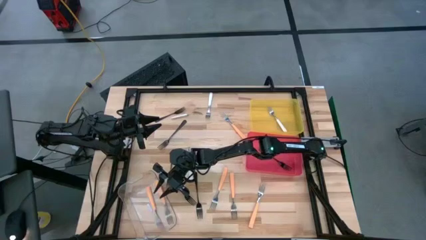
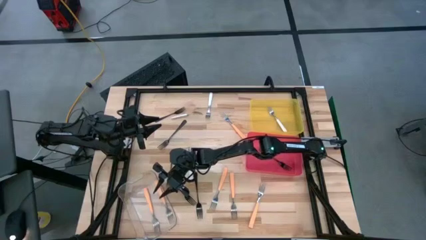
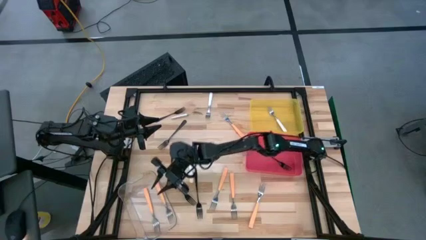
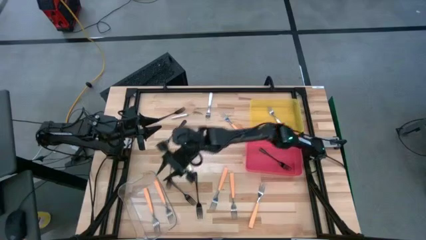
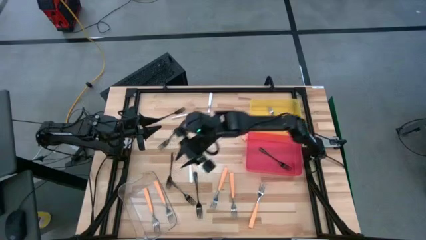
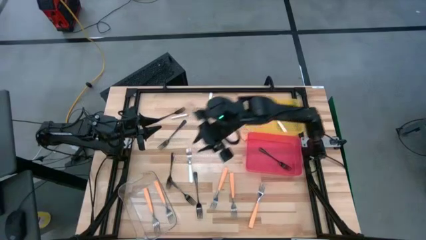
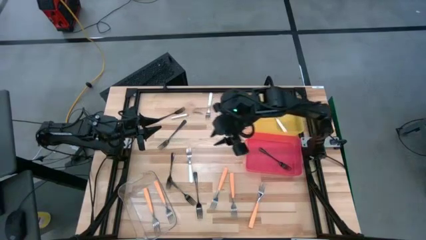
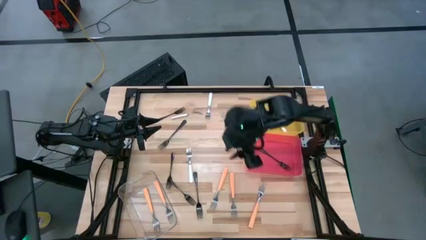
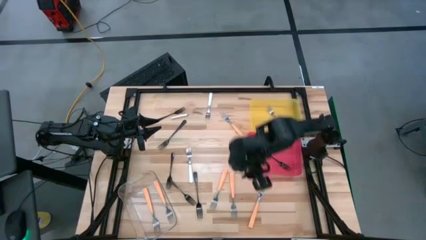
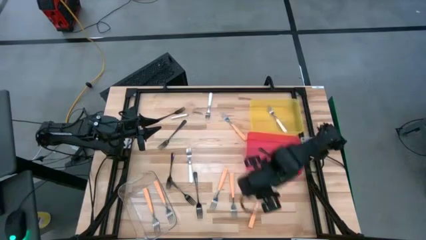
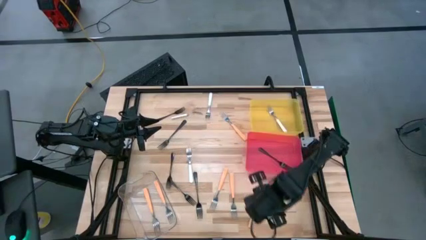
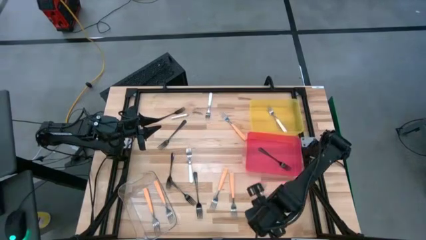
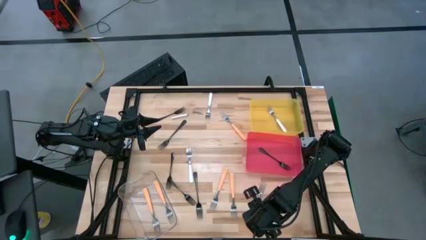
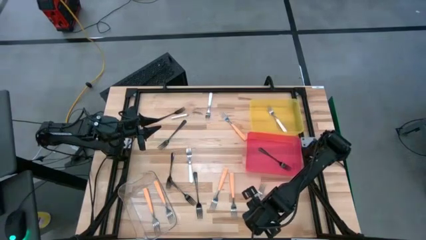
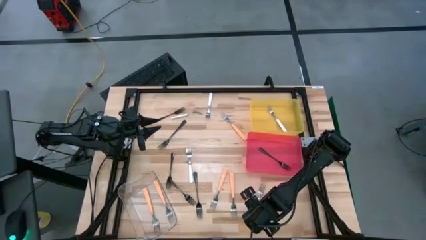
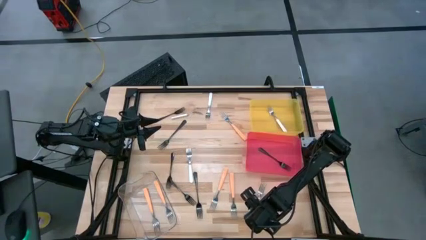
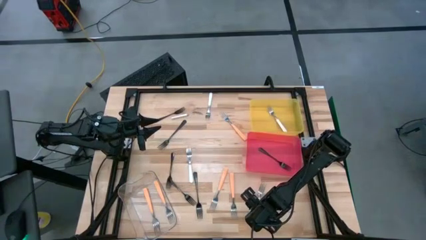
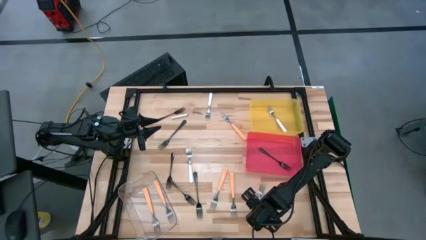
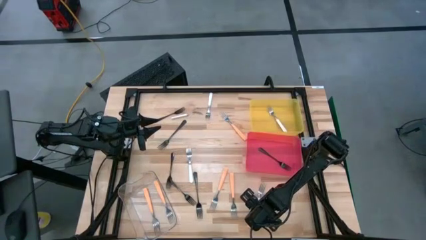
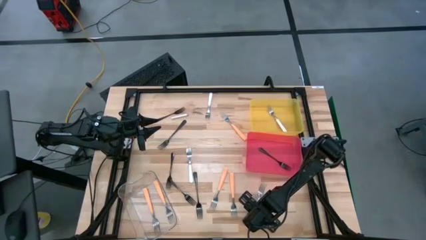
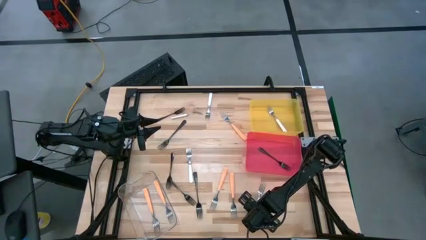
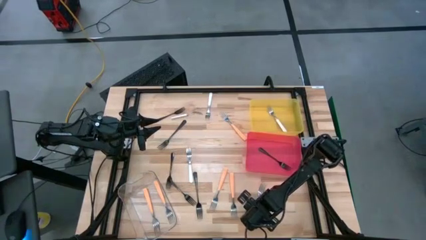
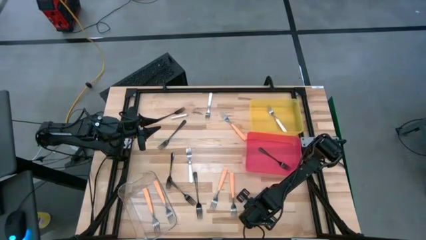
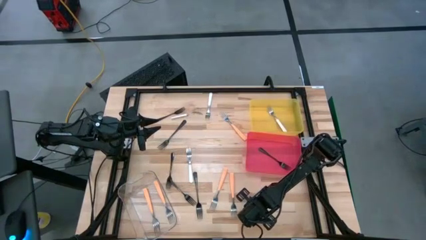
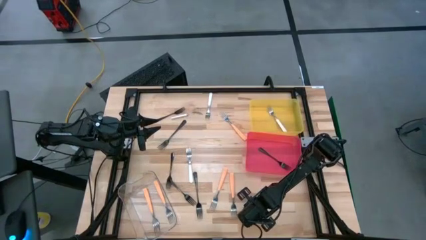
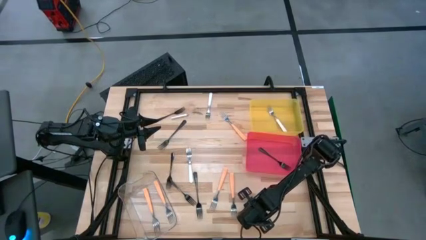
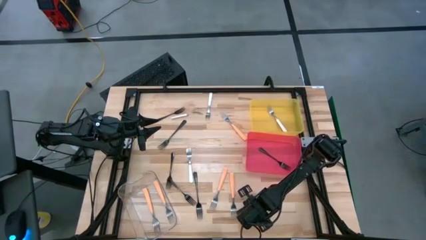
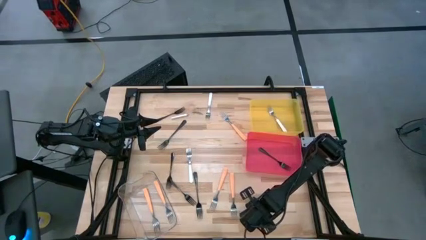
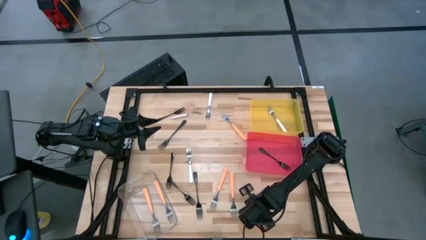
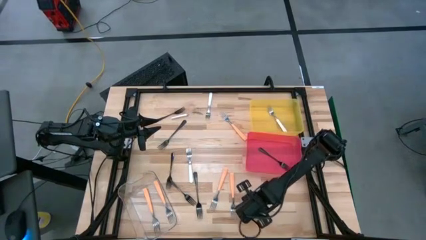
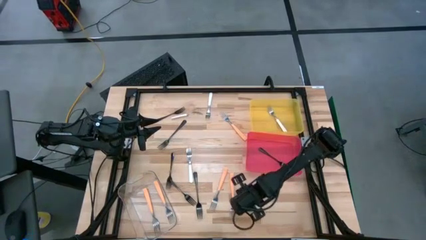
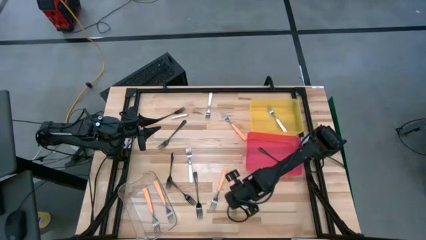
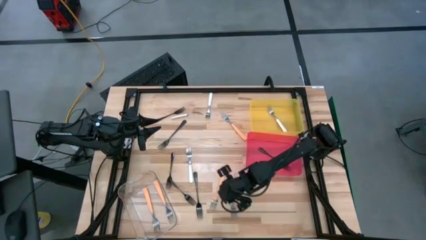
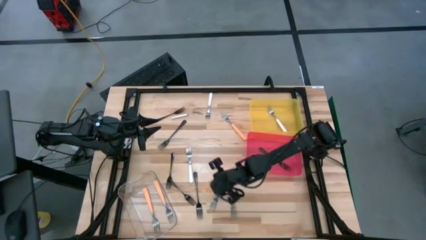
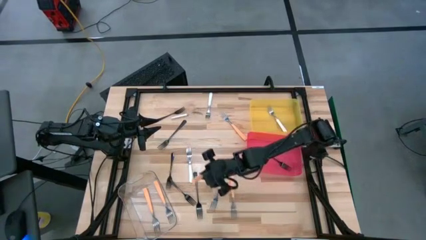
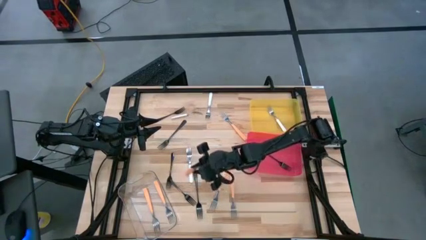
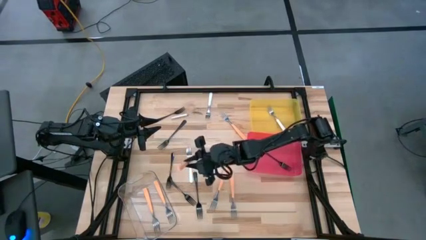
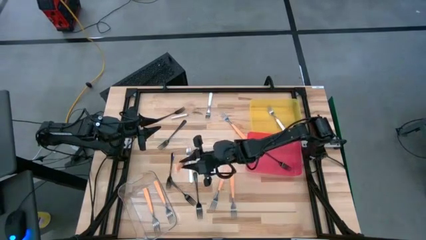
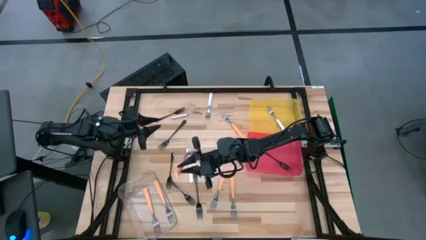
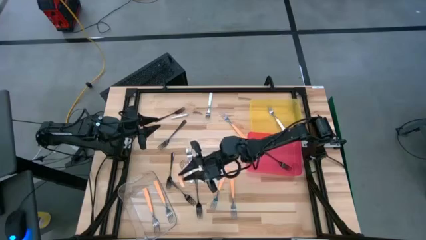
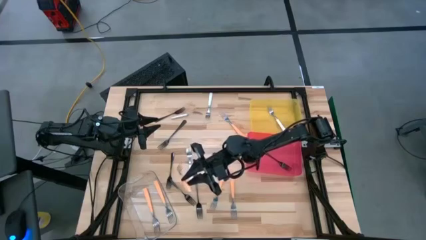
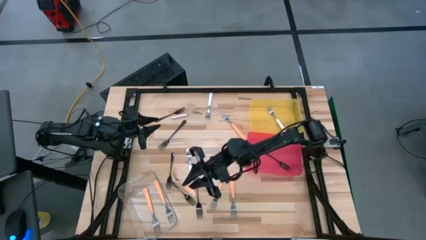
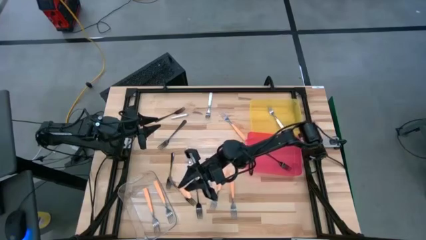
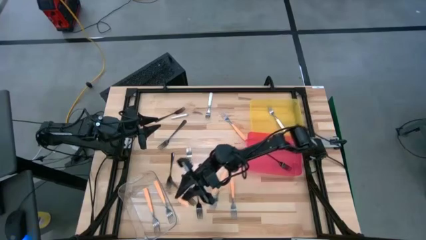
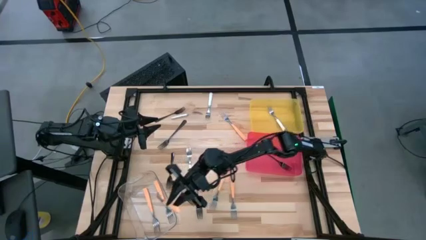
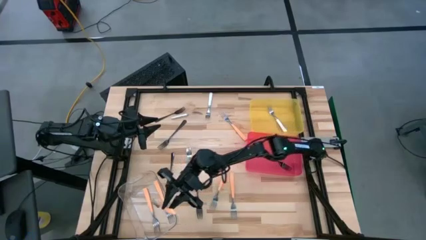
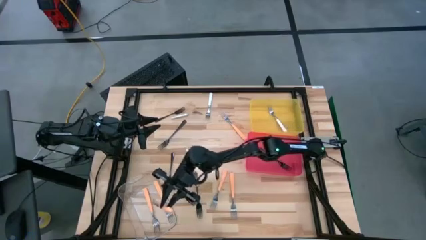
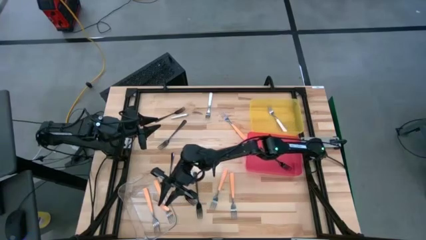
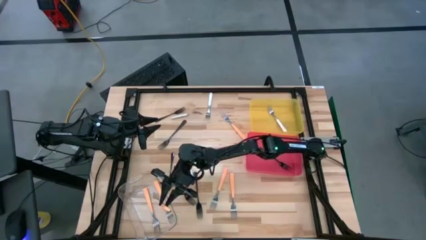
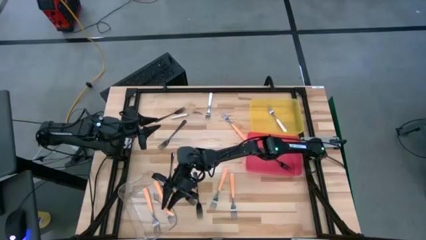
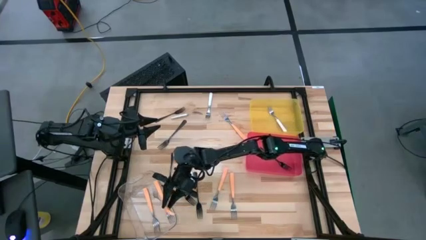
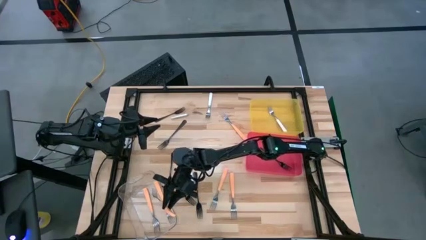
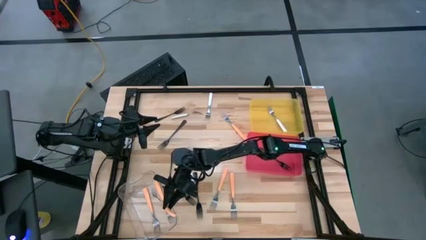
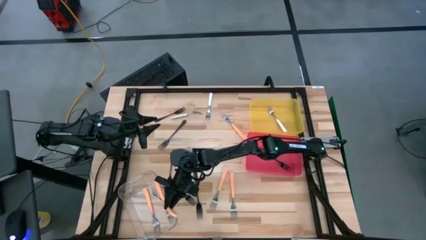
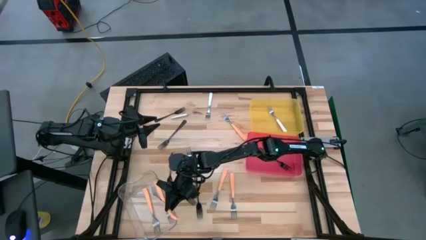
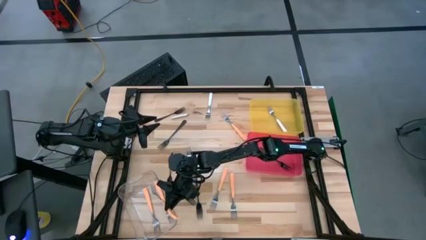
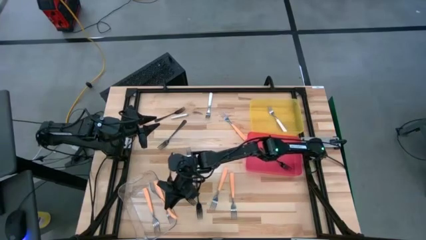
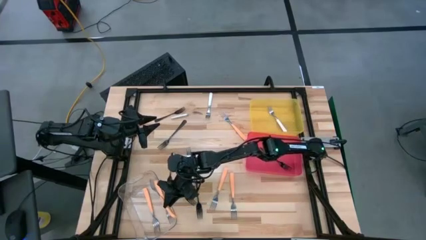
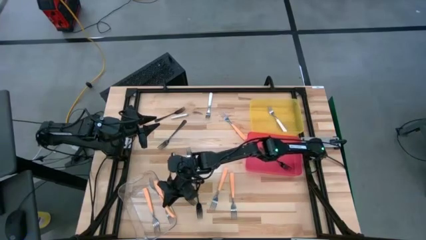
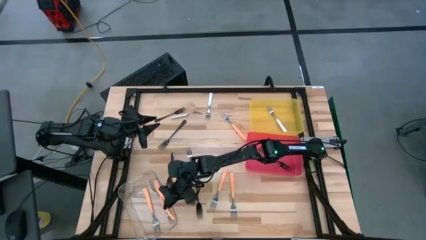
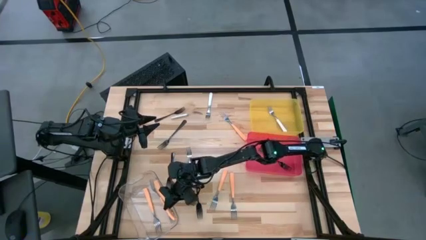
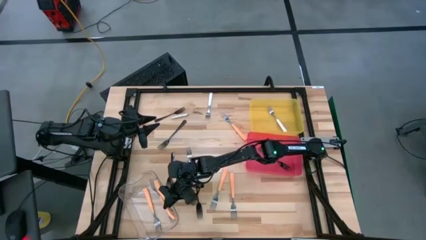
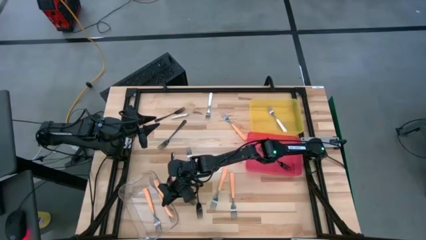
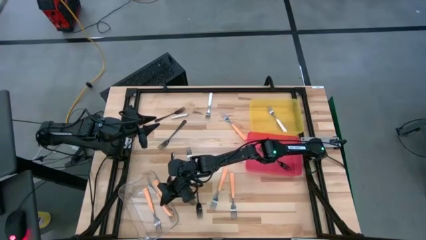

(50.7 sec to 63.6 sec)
Task: Sort silverware by color (type)
Put the orange fork into the transparent bin
